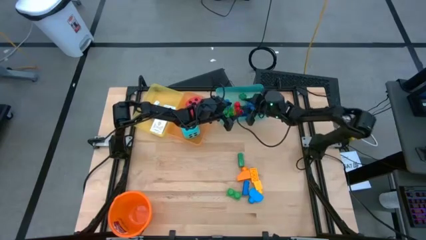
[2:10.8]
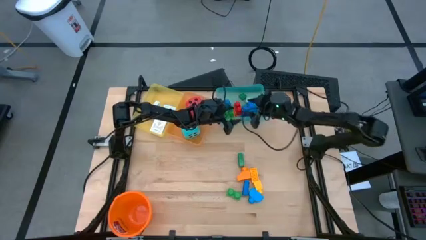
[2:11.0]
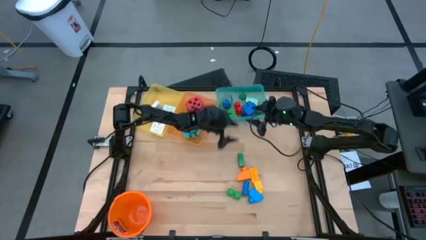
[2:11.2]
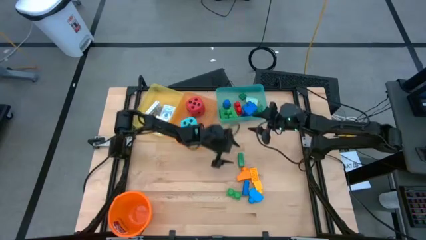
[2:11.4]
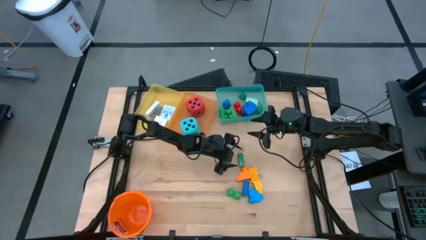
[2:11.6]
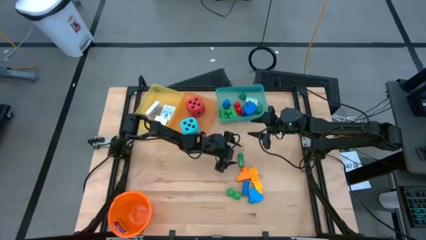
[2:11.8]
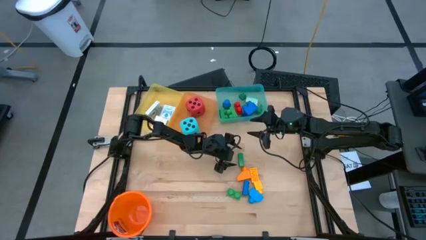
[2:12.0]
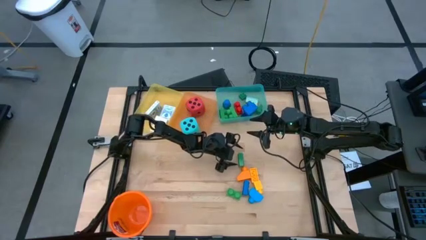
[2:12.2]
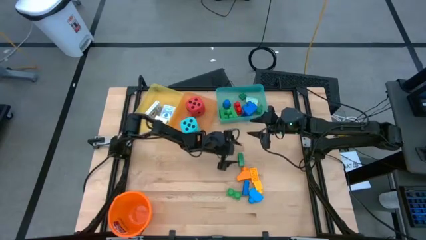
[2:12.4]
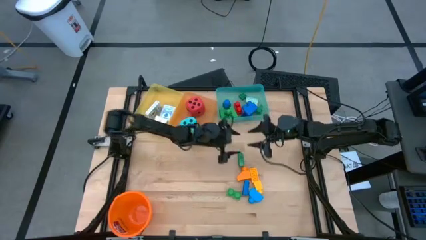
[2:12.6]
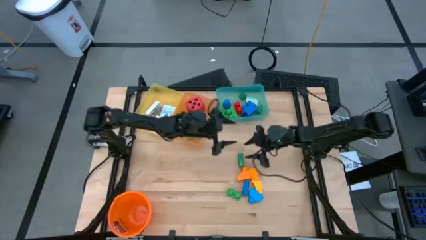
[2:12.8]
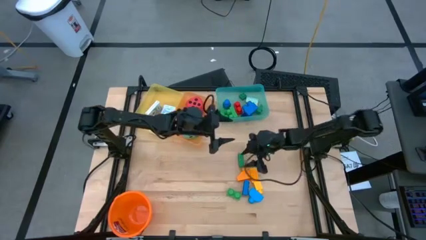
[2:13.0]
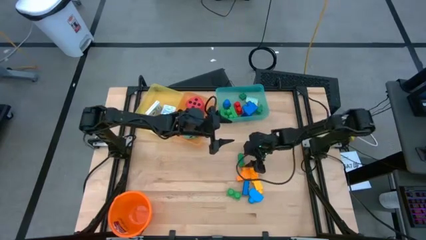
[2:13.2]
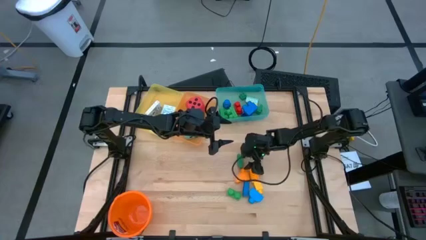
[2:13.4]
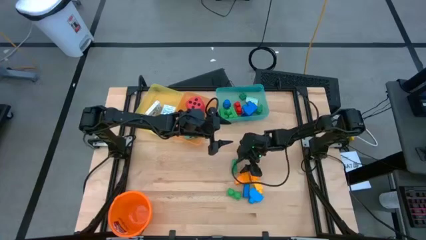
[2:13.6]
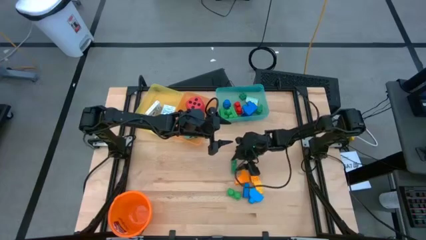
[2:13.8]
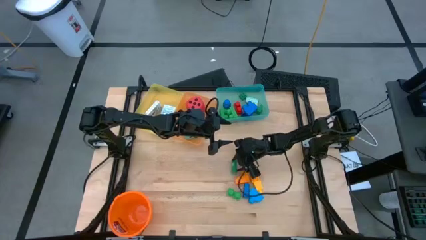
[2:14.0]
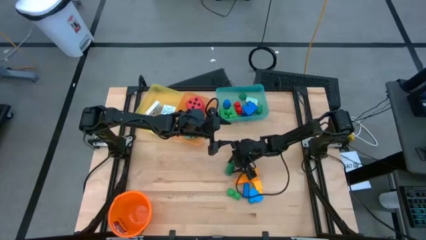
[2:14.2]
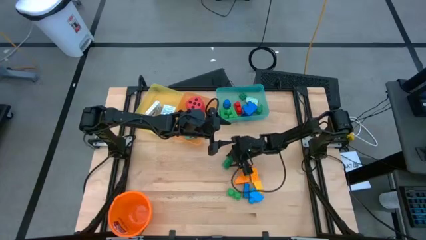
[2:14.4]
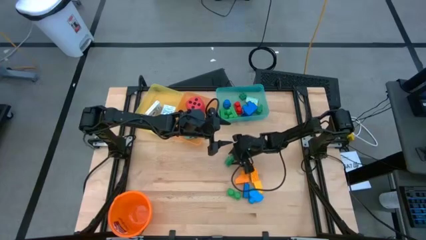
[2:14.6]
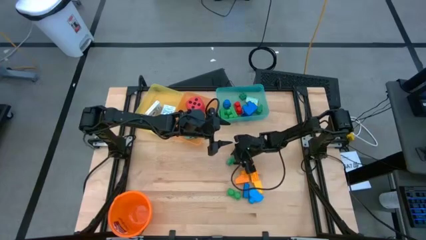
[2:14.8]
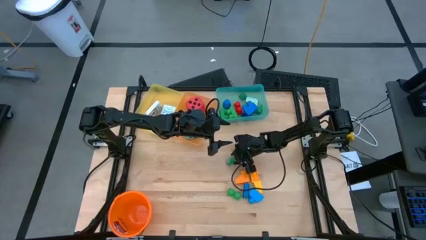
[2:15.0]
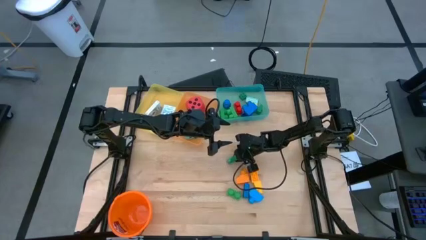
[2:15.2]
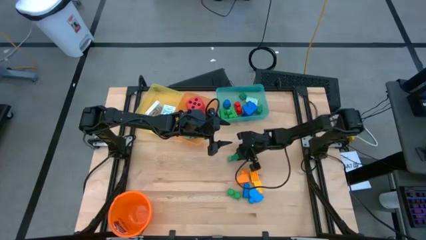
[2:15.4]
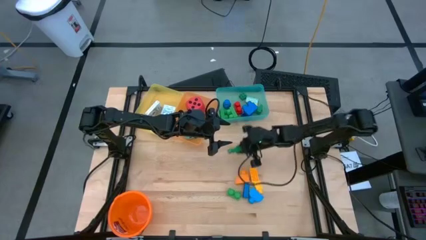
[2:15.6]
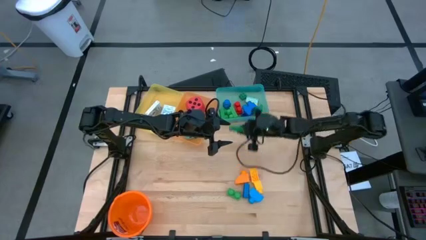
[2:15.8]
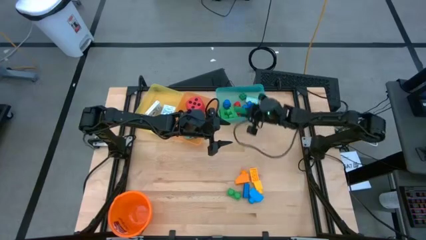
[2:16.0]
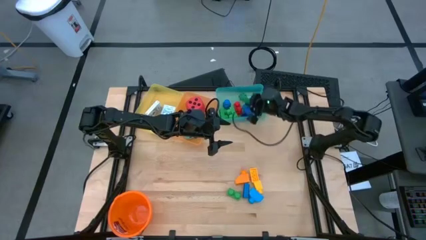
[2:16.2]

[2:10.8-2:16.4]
Task: Pick & Place Toys
Put the green game piece into the blue bin

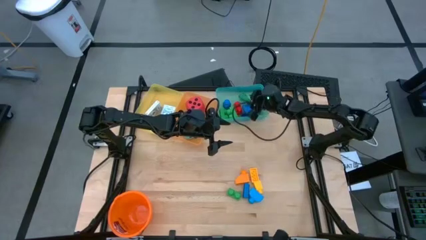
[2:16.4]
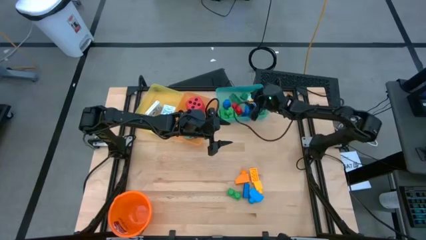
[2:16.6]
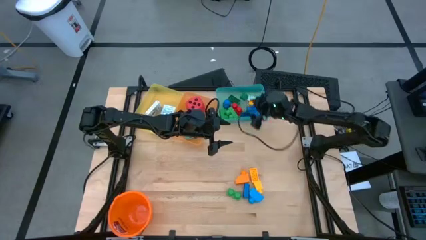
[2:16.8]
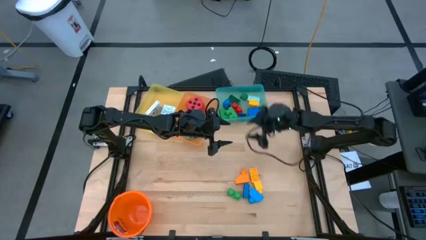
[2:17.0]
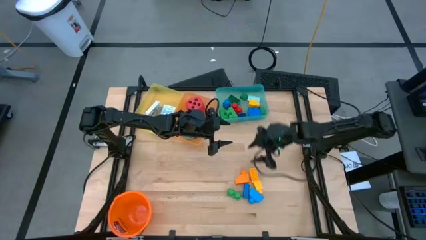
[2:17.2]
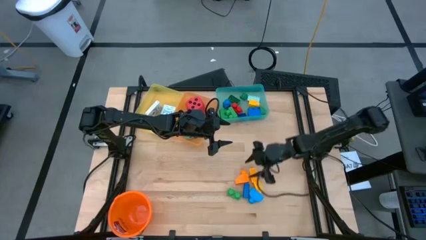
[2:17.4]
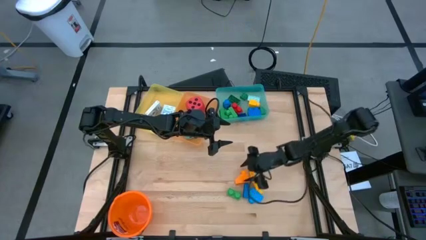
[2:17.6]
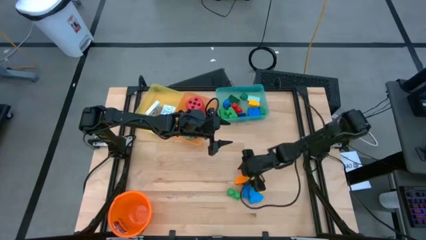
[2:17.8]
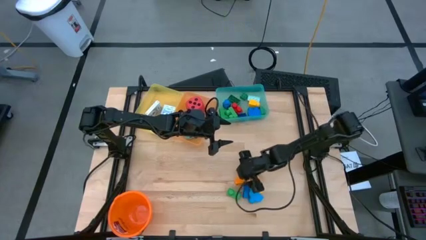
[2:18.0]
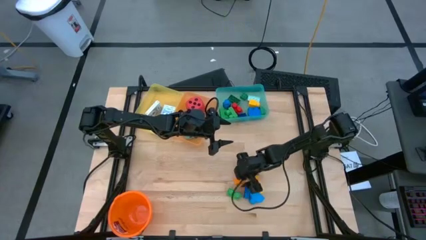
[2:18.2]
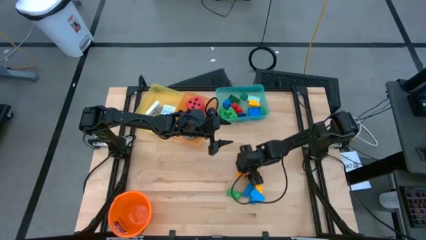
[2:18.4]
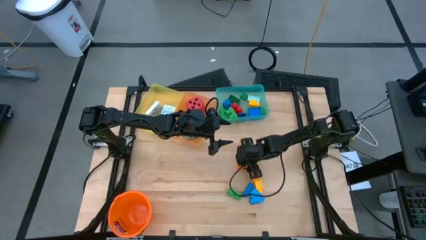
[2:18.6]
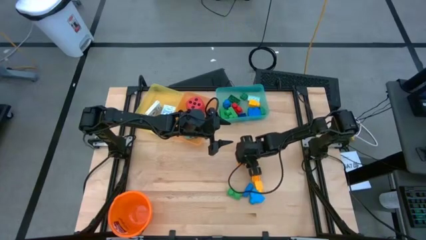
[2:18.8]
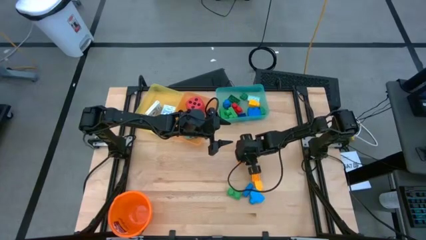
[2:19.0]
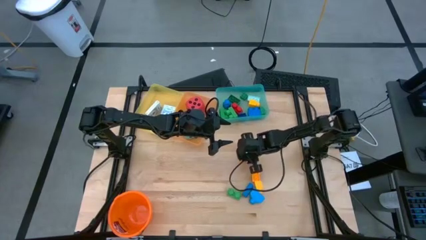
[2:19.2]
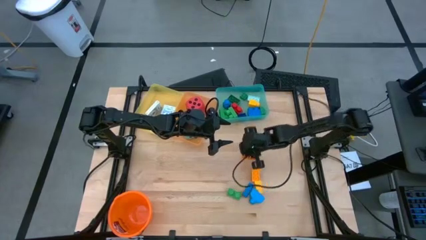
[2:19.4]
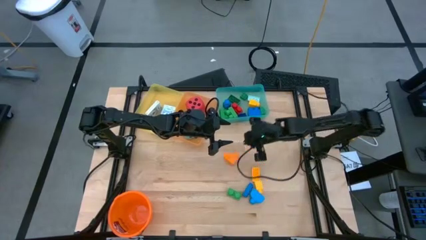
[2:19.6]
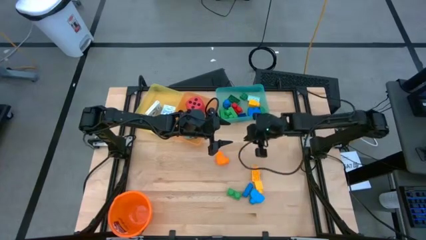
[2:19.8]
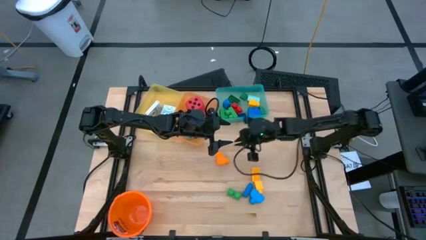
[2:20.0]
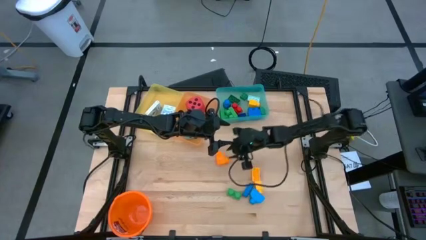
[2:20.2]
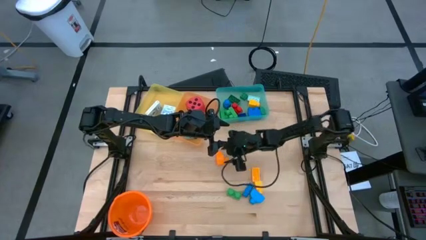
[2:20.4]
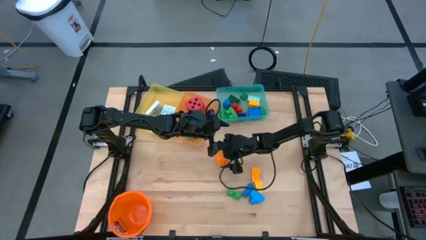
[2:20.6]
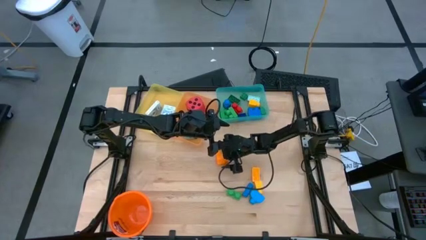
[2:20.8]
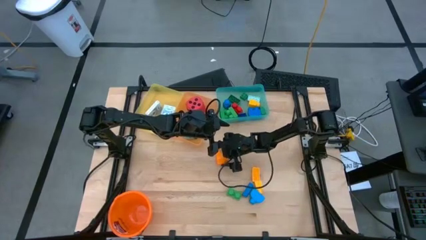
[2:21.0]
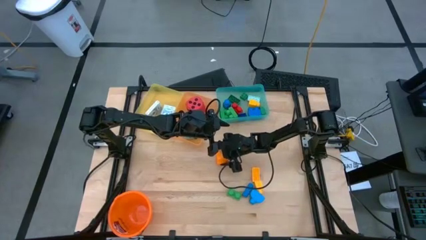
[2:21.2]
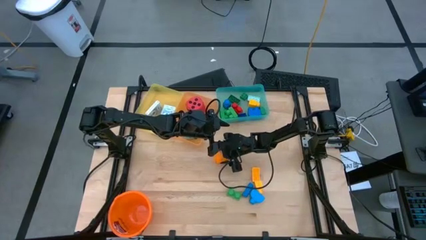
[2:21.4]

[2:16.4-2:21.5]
Put the orange game piece into the blue bin

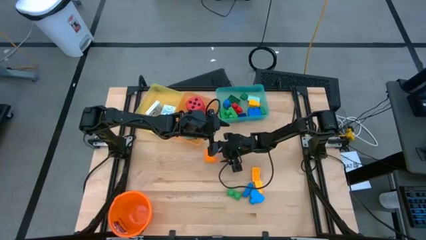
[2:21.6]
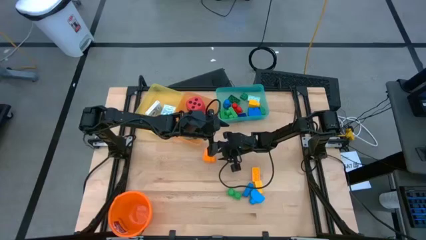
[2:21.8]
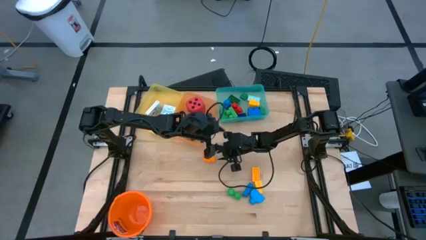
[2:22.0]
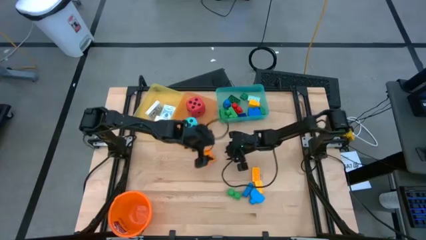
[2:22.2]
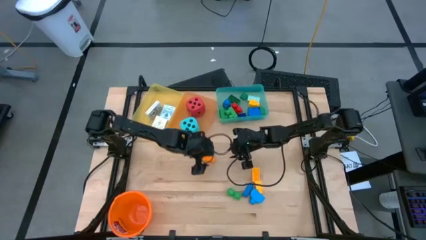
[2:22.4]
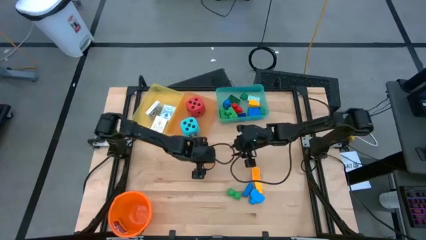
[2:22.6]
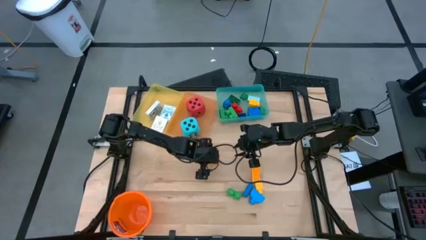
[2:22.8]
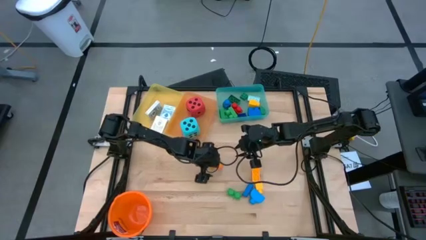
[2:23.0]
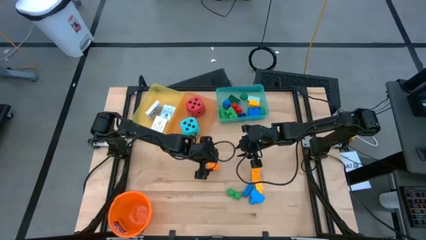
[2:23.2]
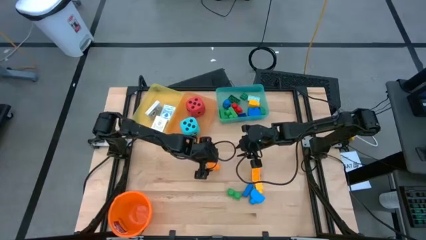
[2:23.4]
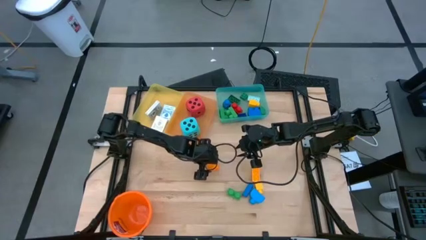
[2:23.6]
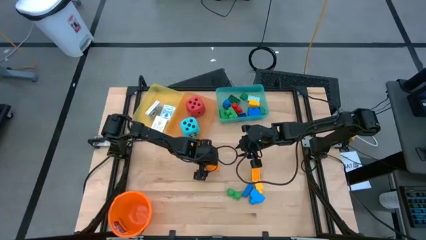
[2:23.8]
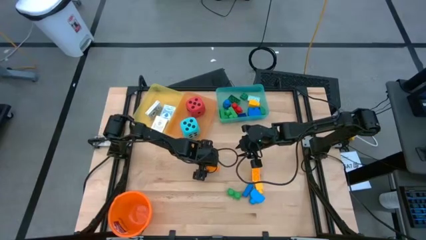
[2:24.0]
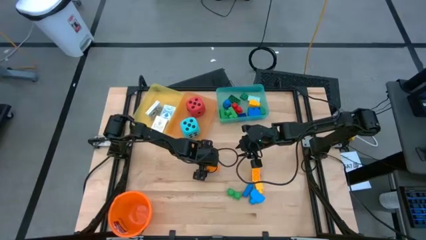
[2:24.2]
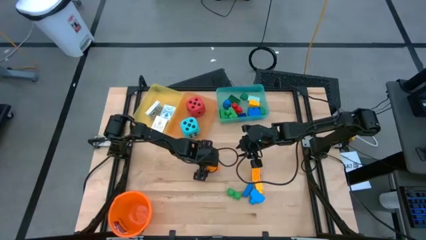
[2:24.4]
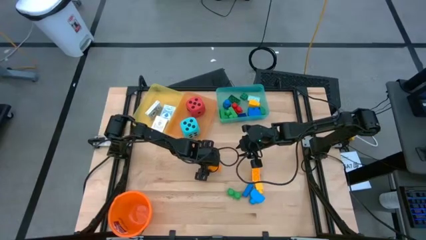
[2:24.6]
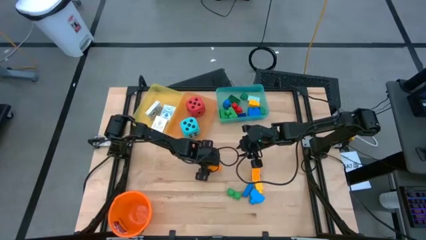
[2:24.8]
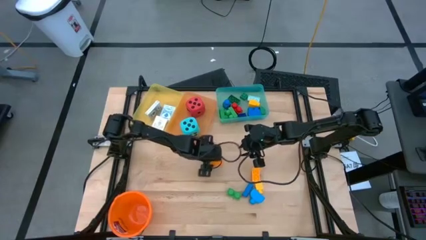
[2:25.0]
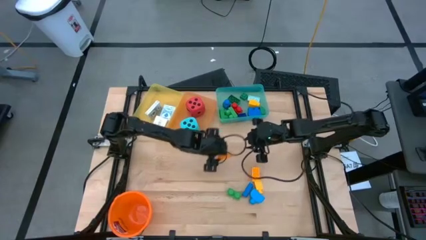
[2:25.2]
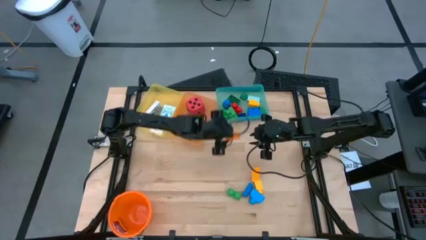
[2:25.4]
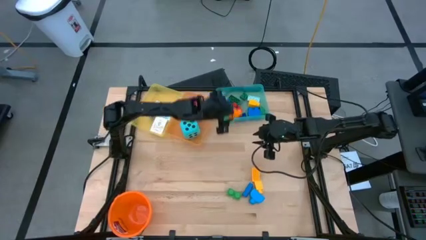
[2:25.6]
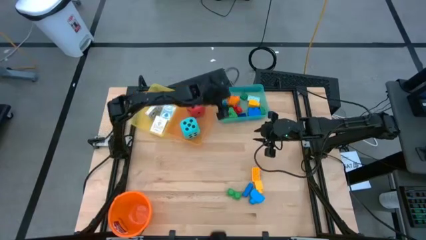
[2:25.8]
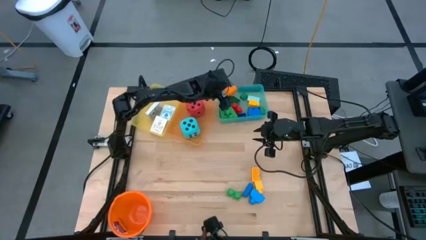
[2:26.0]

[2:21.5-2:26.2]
Put the orange game piece into the blue bin
